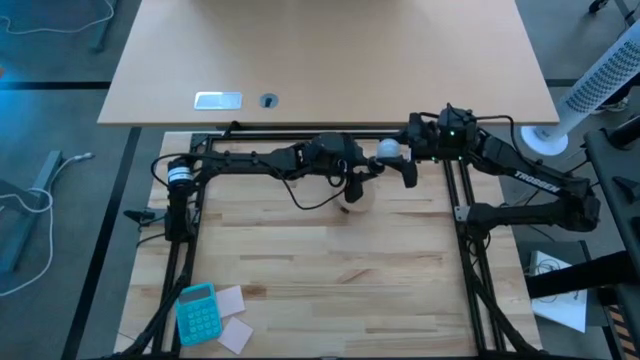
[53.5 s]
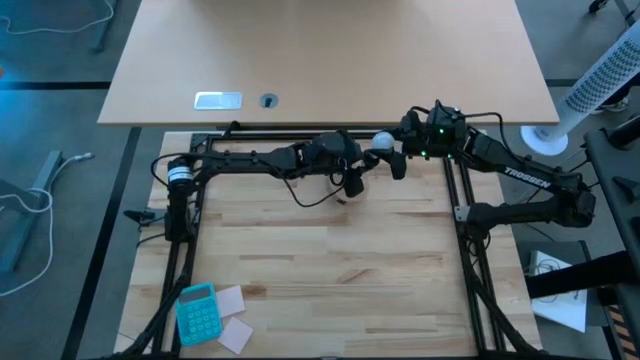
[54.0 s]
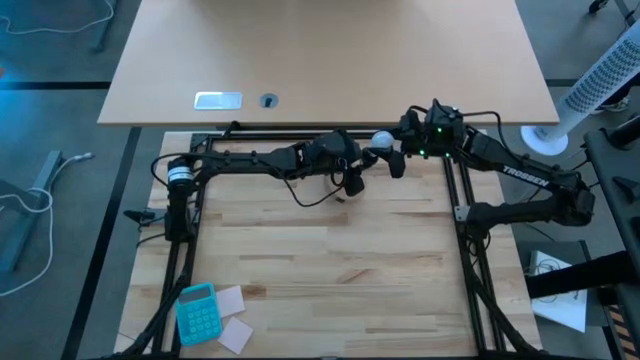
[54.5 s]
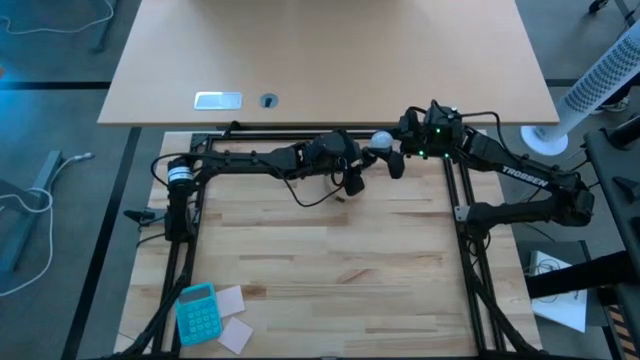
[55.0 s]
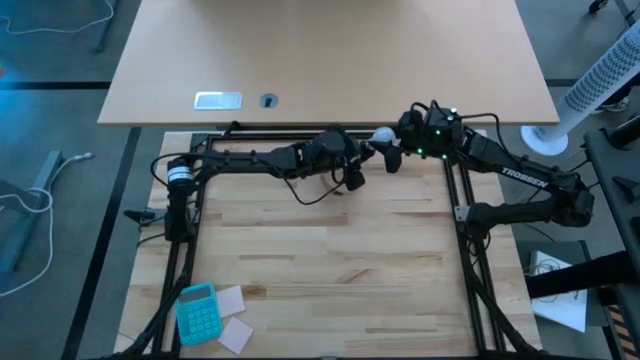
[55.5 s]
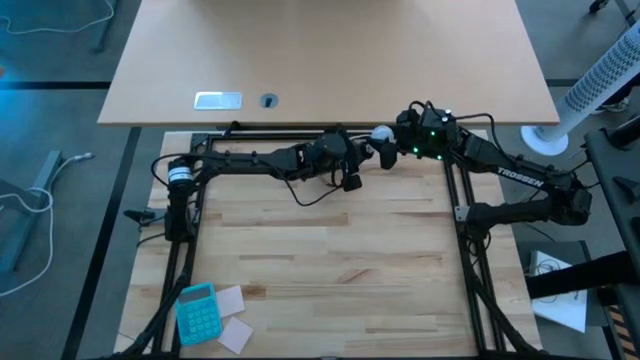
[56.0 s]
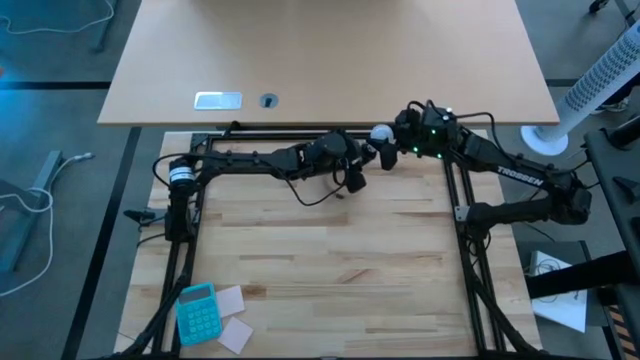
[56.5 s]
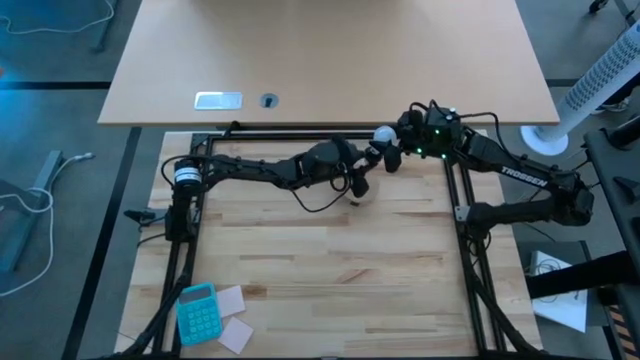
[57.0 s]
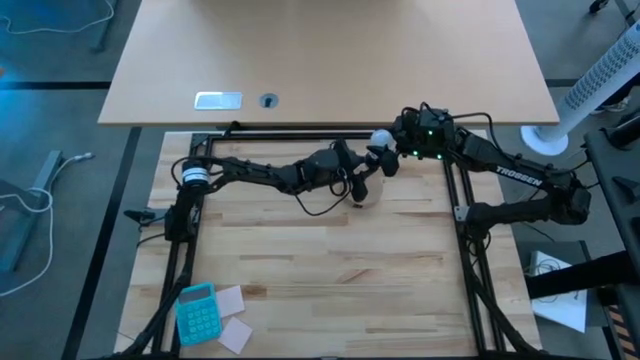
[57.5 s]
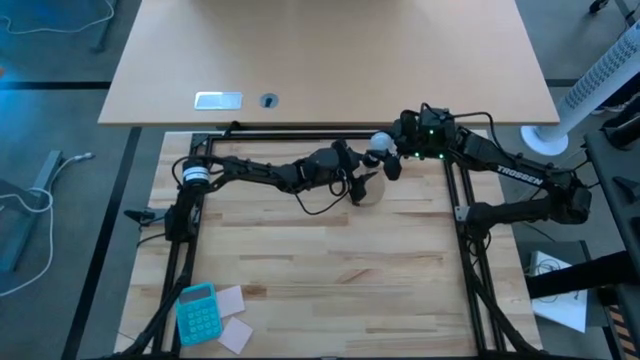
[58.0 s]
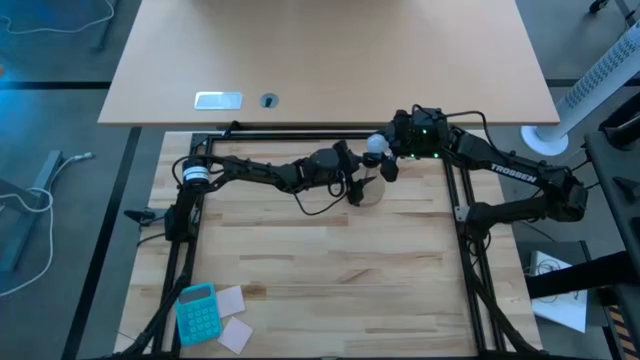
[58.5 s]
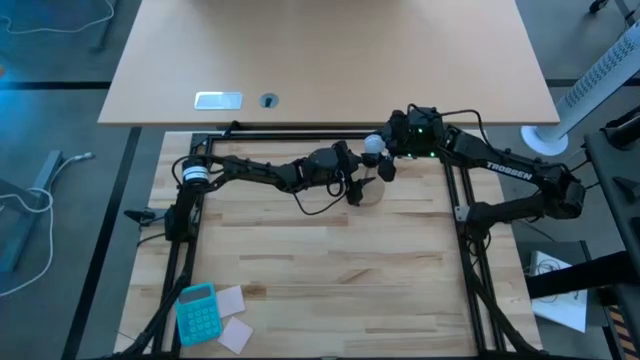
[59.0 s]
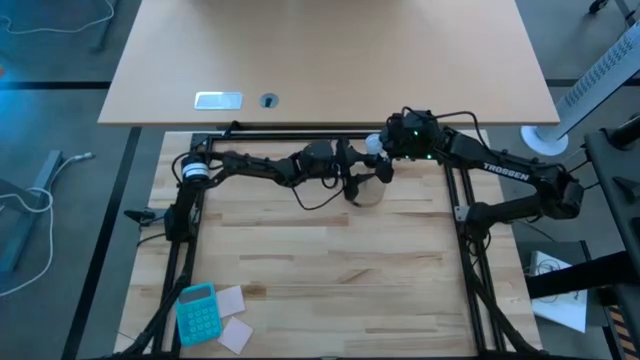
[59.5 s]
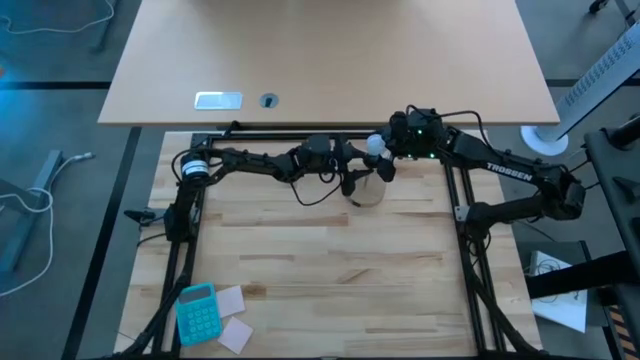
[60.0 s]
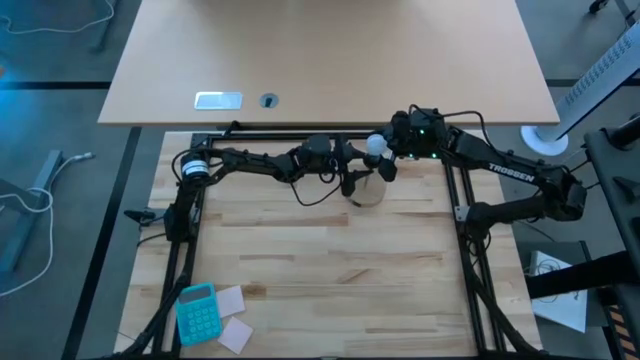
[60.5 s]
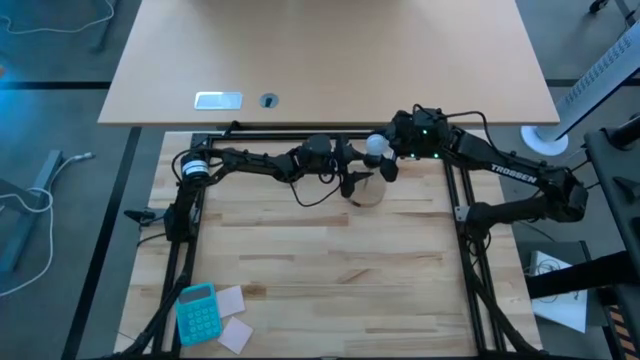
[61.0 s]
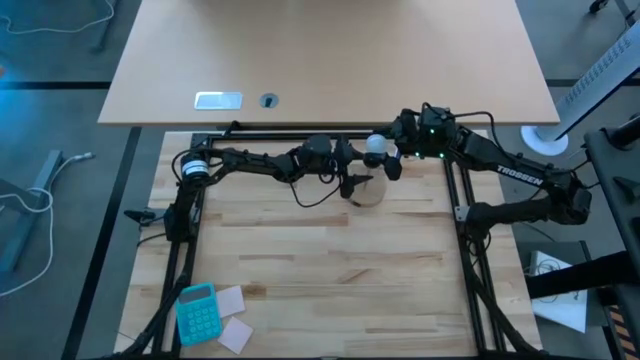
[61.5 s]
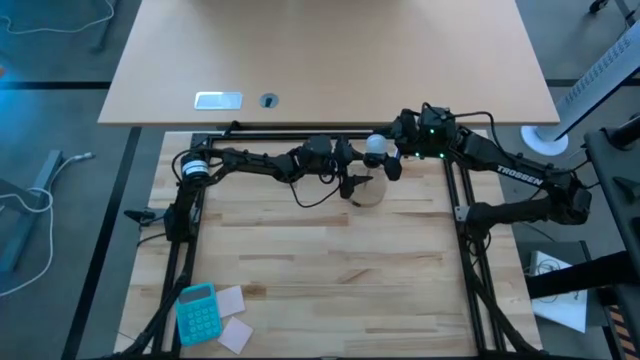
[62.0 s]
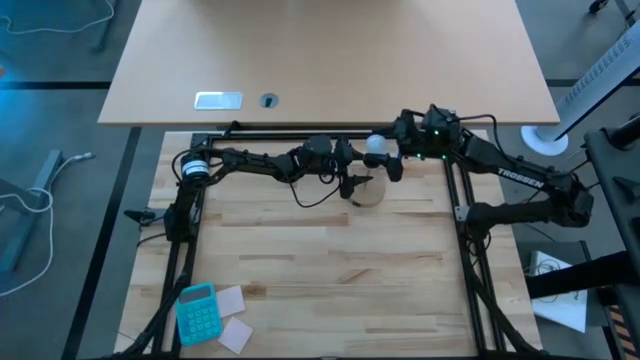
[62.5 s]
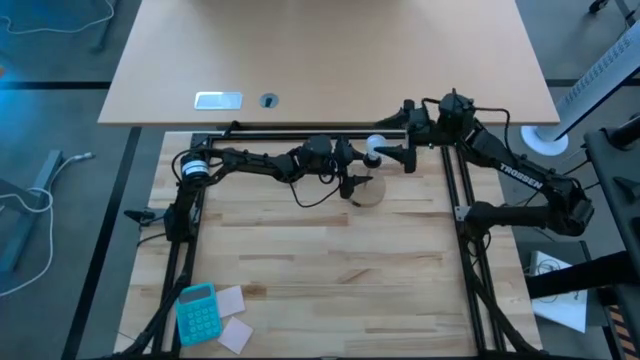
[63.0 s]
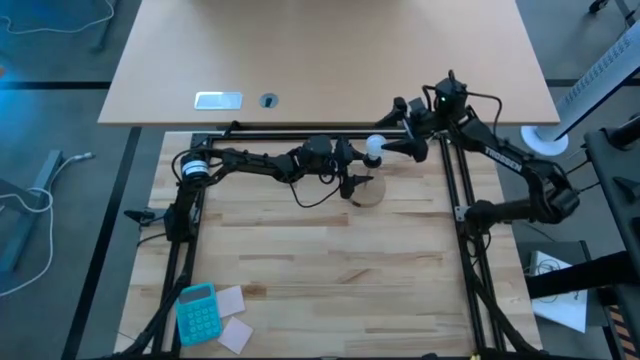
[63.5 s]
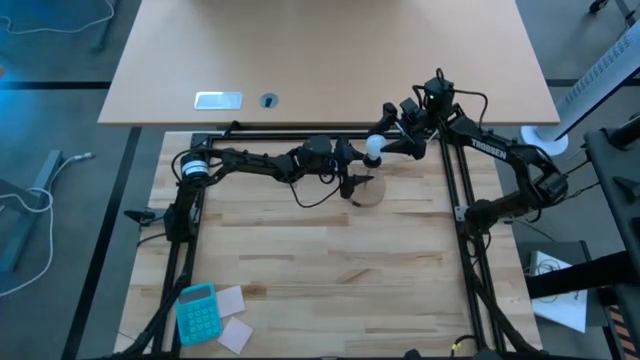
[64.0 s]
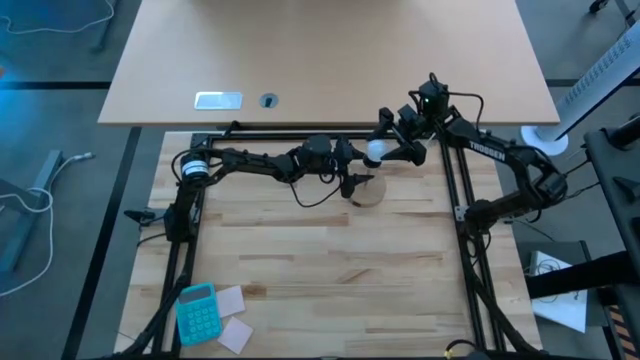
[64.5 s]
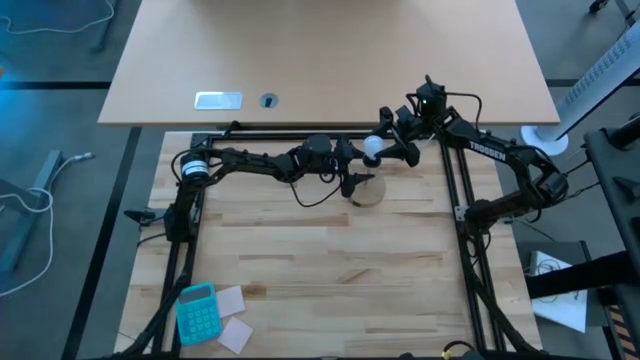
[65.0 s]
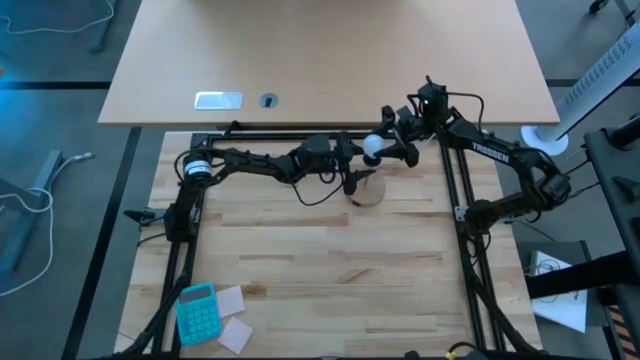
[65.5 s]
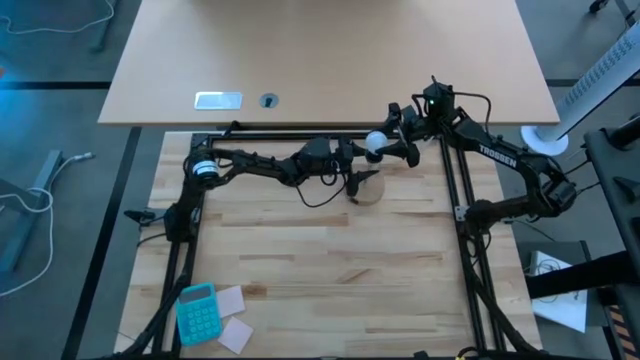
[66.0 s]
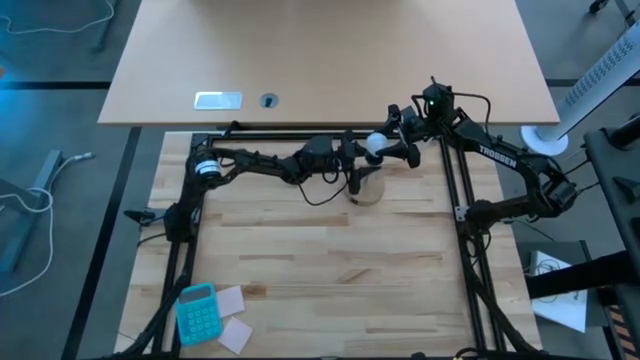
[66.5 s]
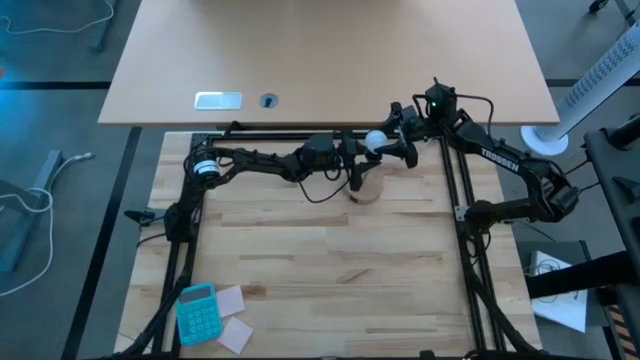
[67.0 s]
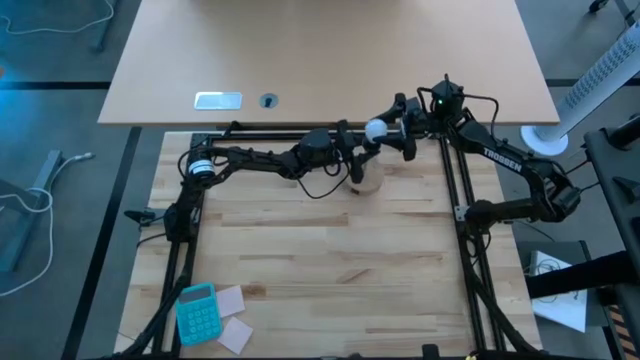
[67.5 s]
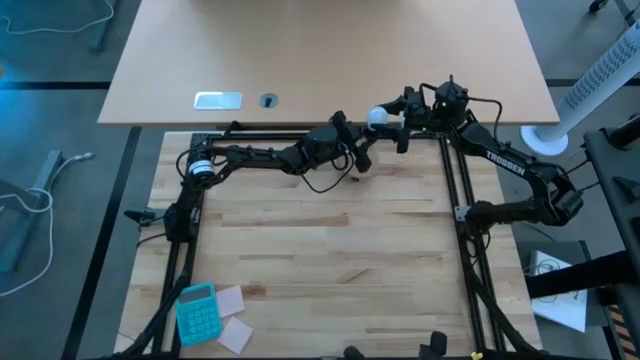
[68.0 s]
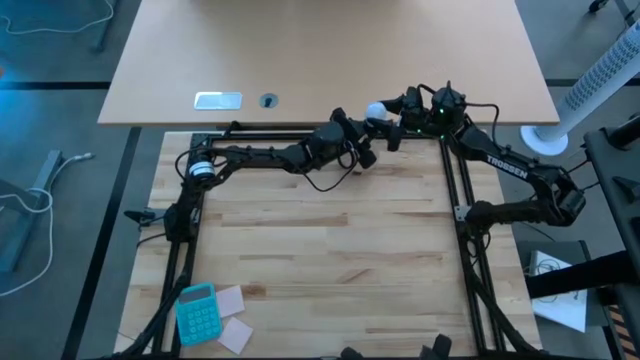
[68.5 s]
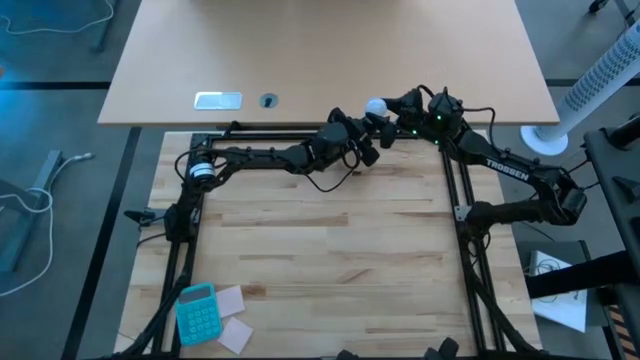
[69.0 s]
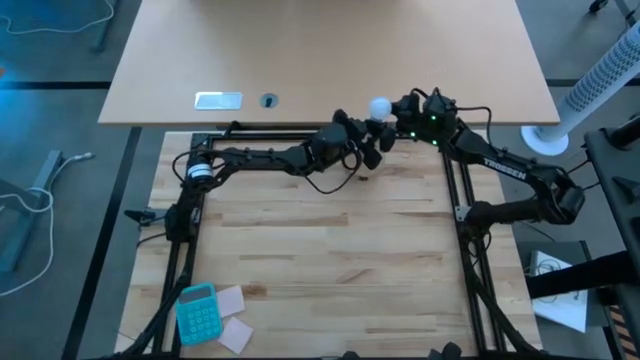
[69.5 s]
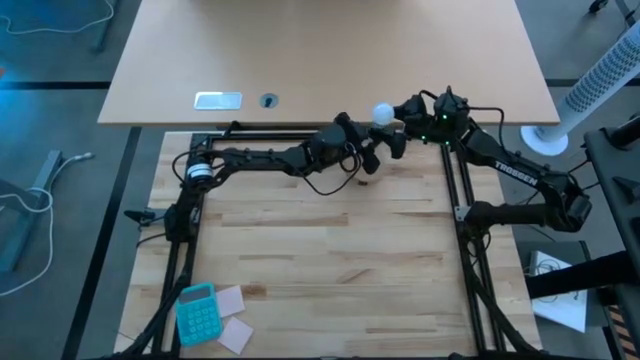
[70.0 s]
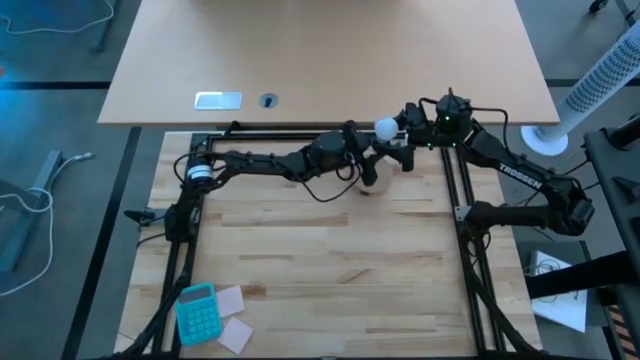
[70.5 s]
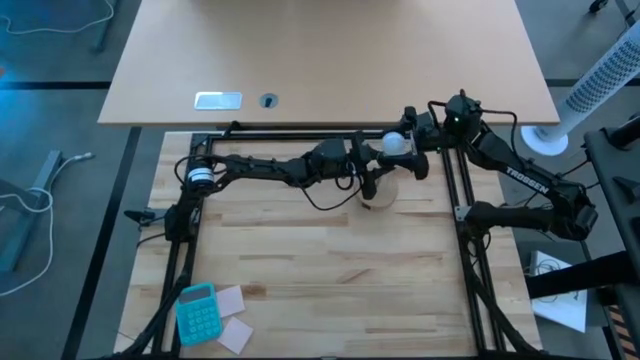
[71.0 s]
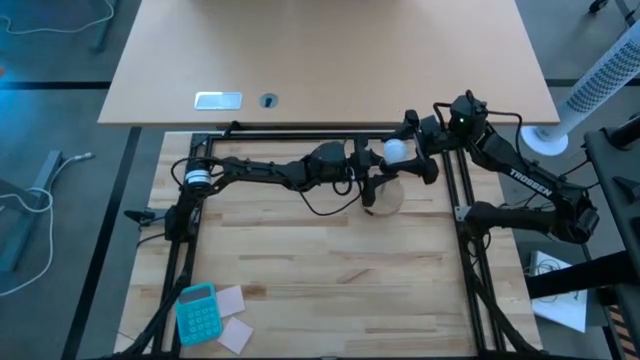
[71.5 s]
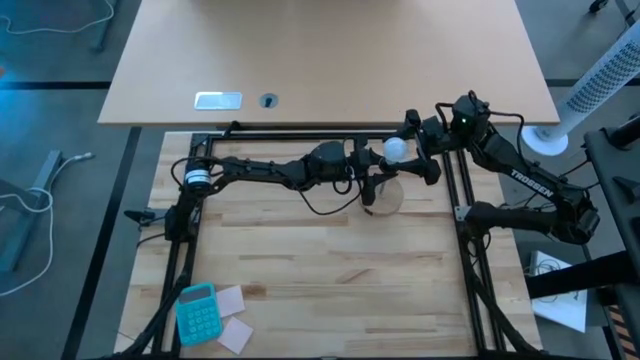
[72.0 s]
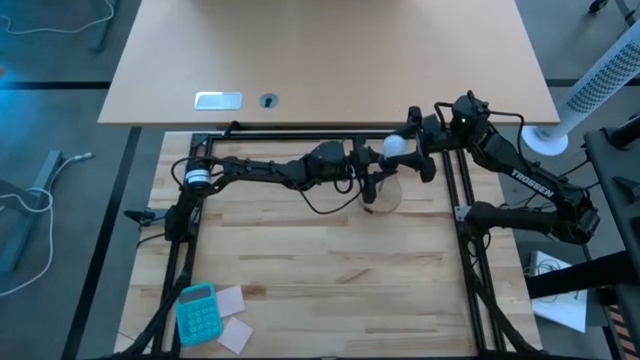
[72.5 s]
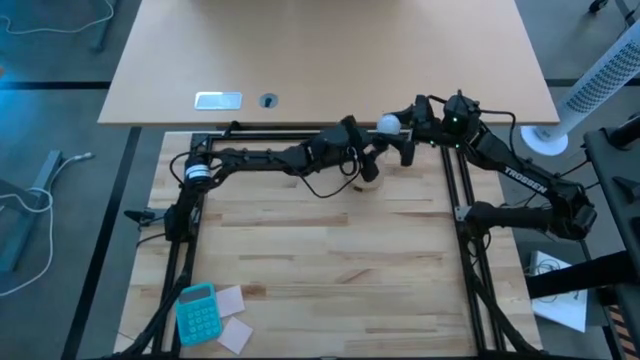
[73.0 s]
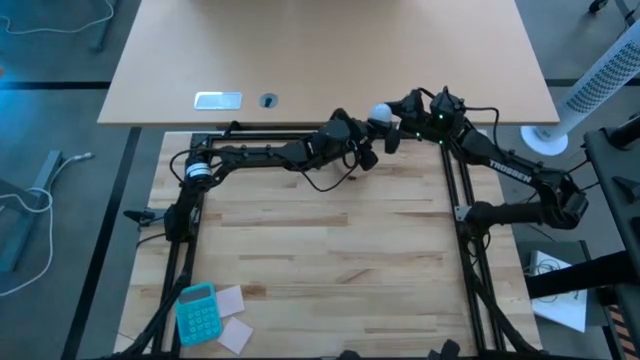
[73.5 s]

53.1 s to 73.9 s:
Task: Screw lightbulb
Insert the lightbulb into the lamp
